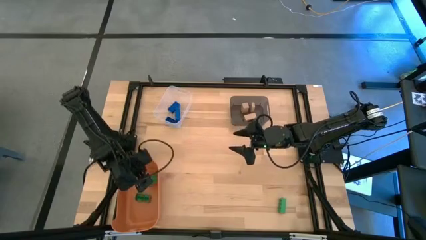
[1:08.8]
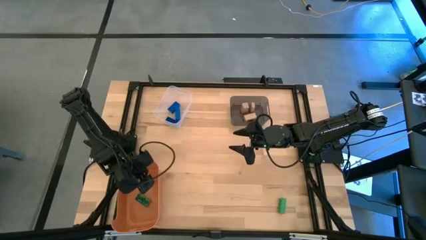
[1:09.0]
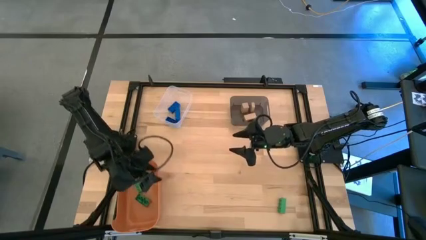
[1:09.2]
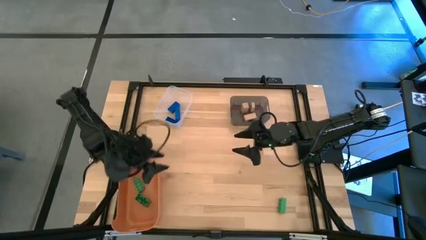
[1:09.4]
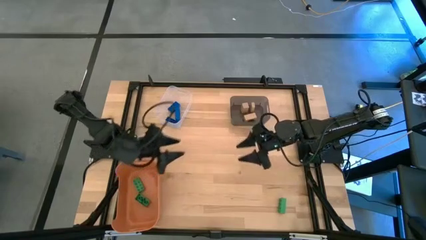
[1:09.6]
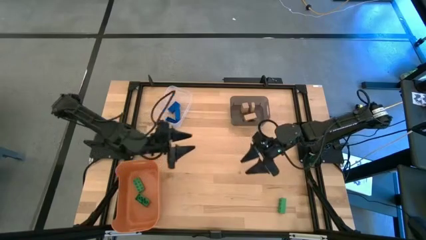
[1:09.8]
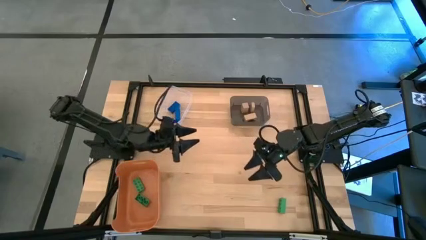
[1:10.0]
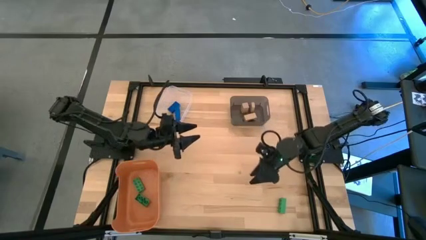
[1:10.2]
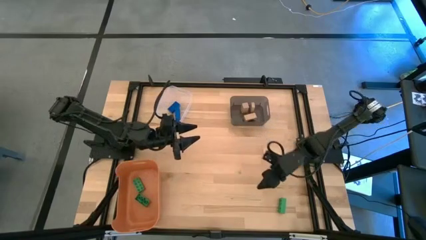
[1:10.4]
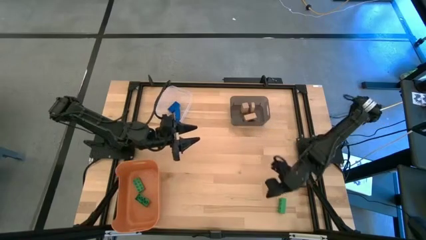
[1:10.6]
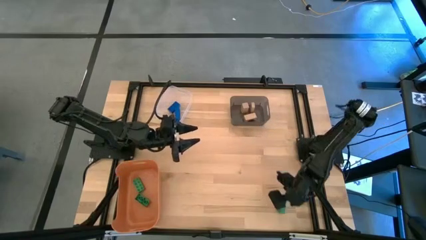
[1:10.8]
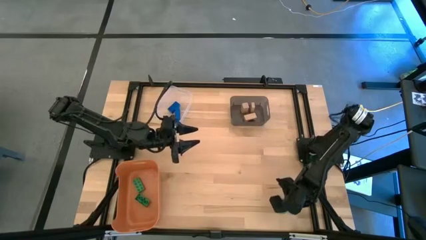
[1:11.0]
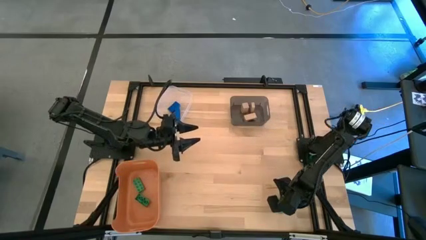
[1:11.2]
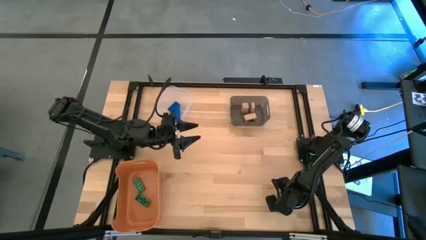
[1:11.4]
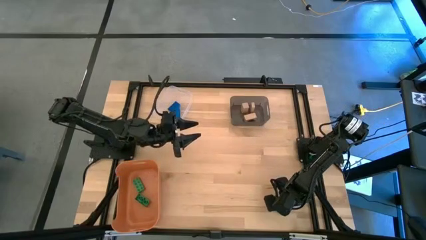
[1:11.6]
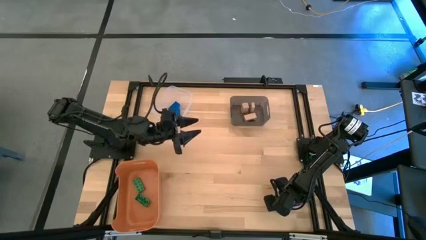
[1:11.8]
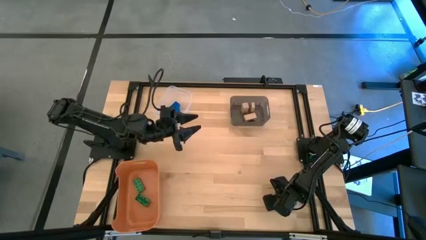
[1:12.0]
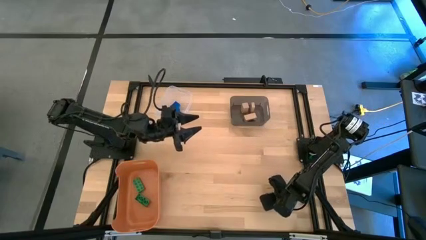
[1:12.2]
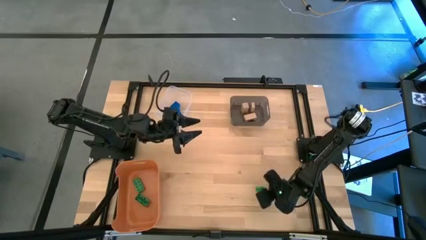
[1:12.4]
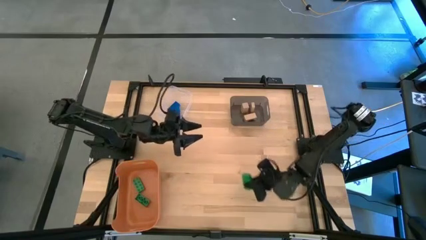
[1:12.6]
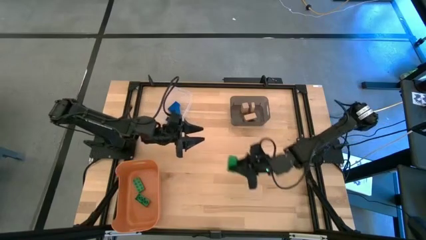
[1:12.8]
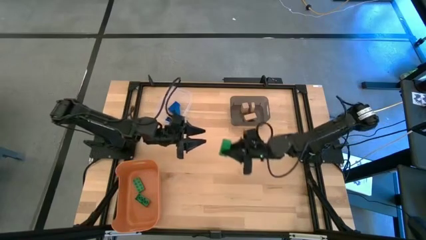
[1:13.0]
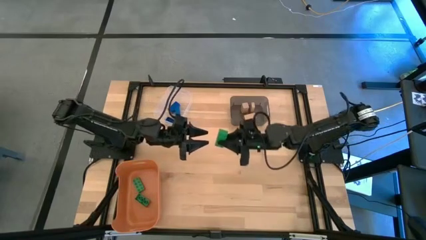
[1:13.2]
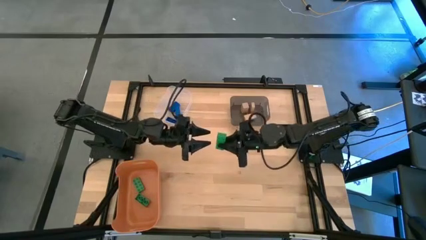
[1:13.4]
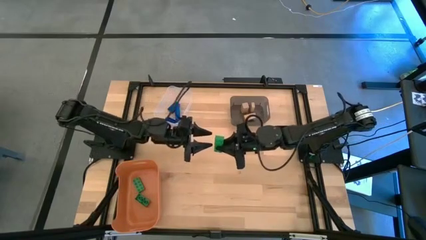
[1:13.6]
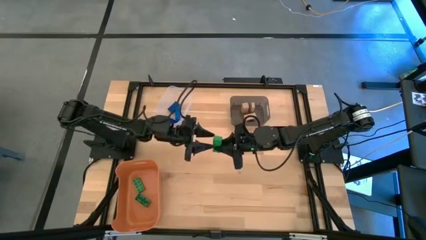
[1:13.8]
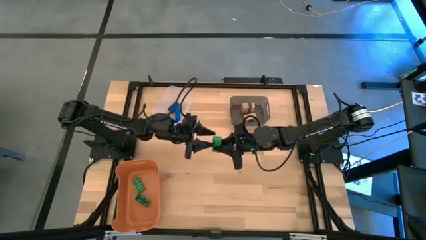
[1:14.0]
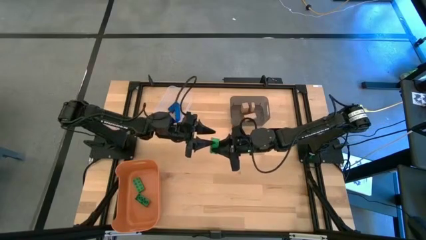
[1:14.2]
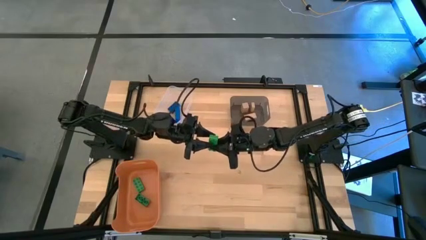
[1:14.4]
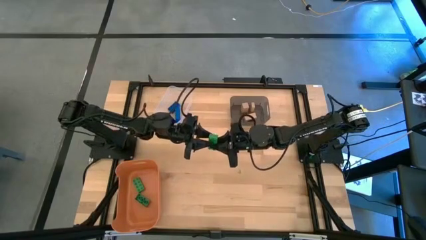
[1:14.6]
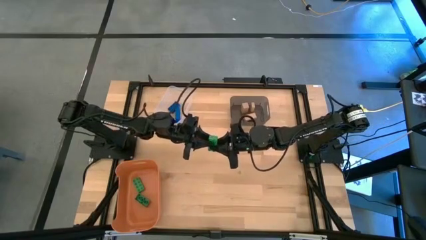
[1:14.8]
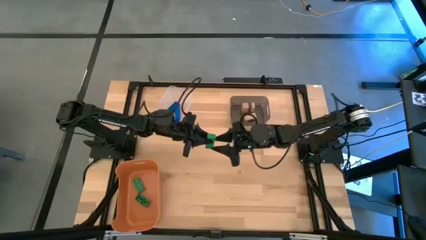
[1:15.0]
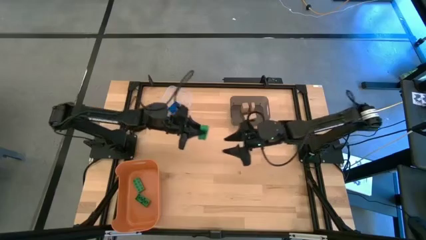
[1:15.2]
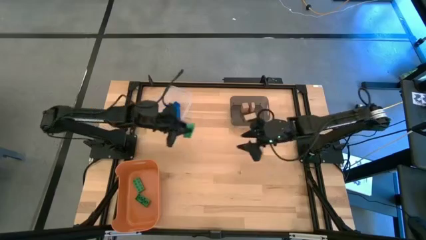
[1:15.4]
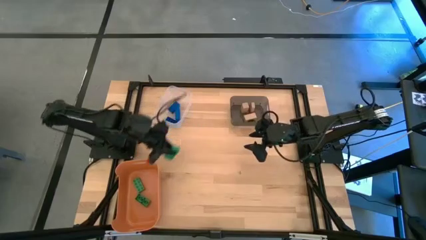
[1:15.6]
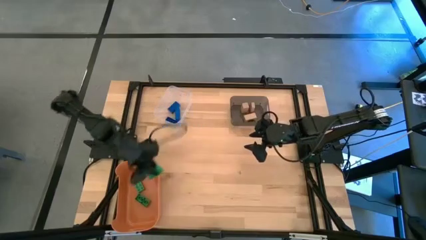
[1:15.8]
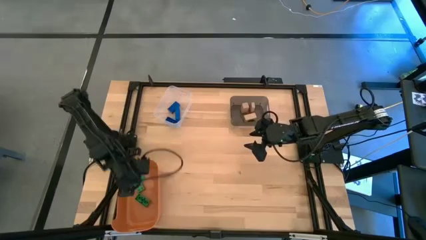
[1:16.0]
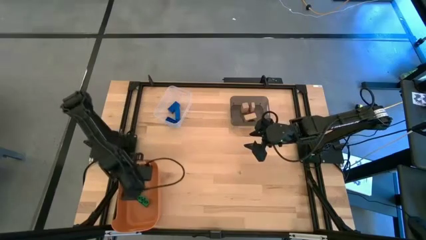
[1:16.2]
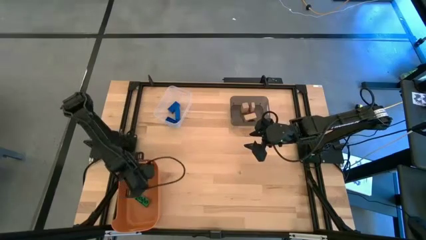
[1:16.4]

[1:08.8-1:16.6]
Task: Sort & place blocks by color
Put the green game piece into the orange bin

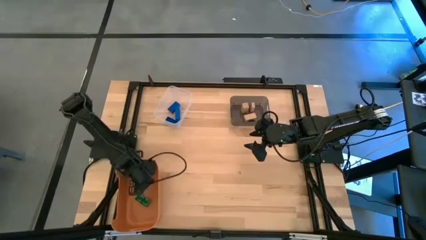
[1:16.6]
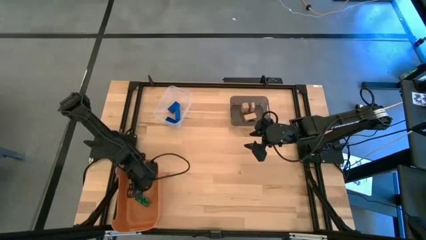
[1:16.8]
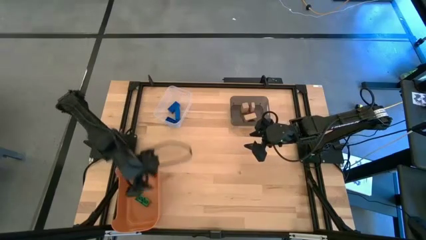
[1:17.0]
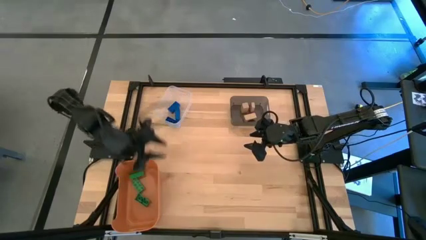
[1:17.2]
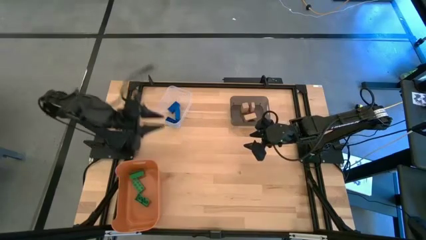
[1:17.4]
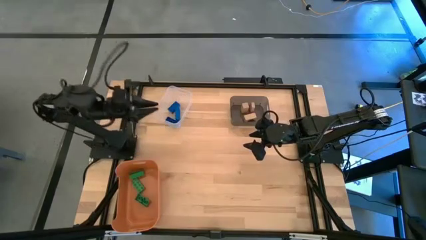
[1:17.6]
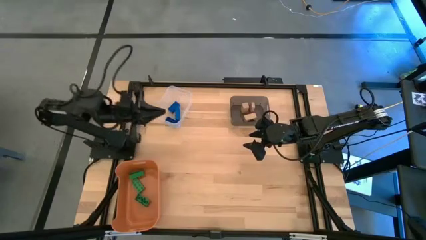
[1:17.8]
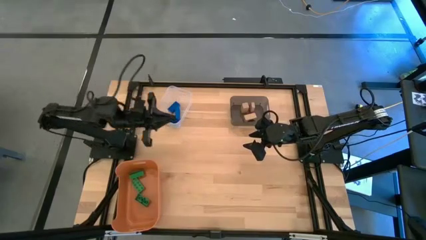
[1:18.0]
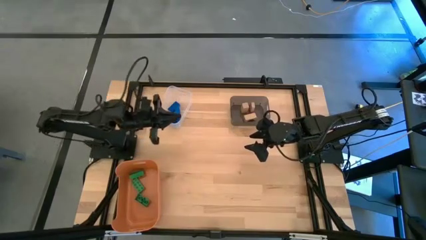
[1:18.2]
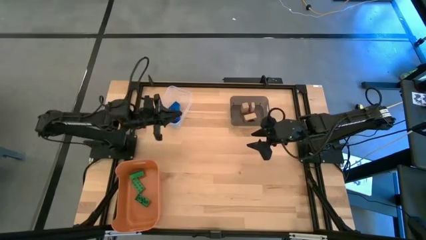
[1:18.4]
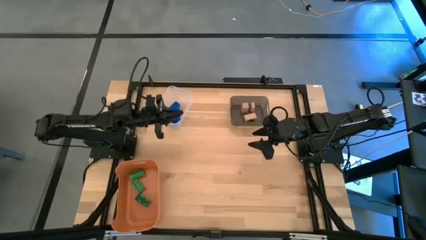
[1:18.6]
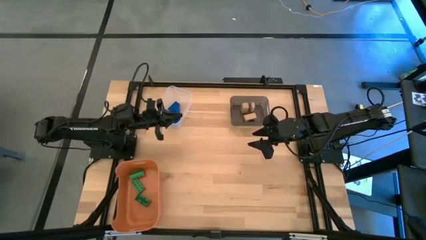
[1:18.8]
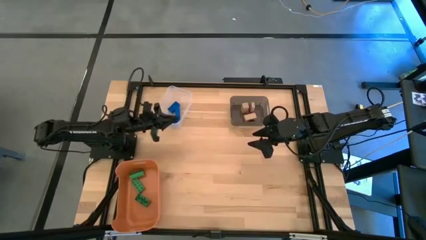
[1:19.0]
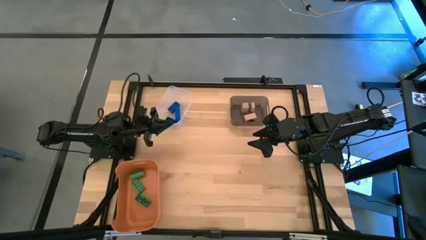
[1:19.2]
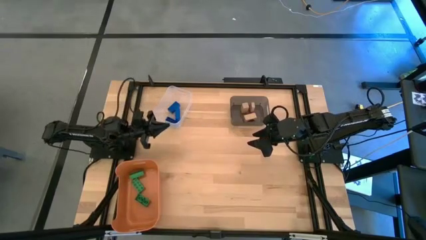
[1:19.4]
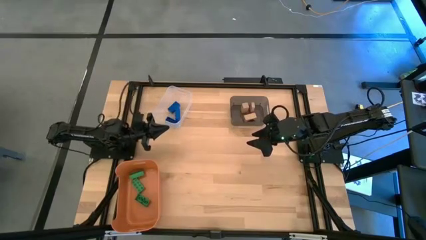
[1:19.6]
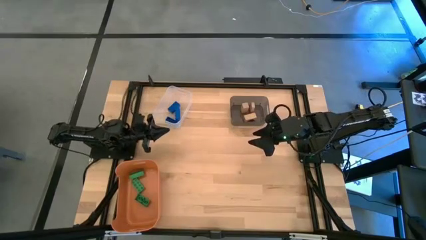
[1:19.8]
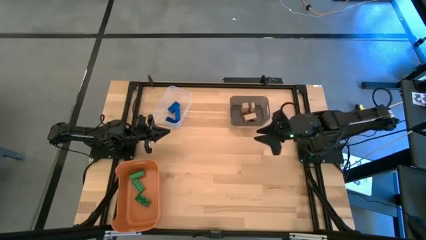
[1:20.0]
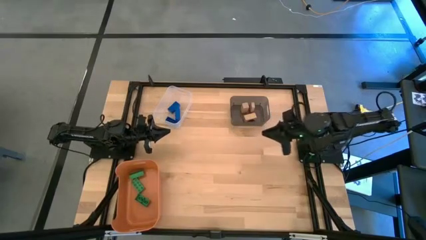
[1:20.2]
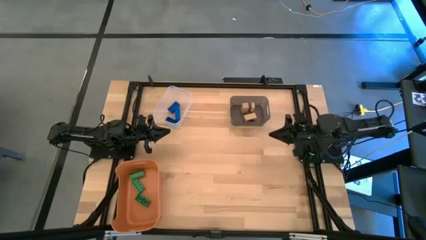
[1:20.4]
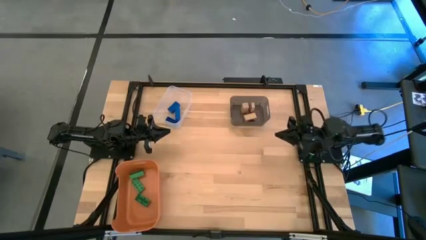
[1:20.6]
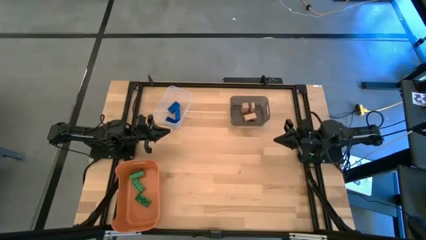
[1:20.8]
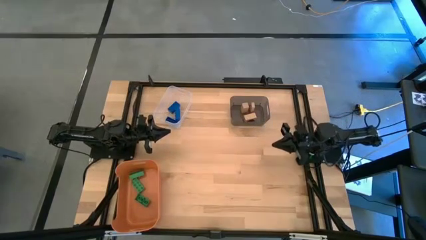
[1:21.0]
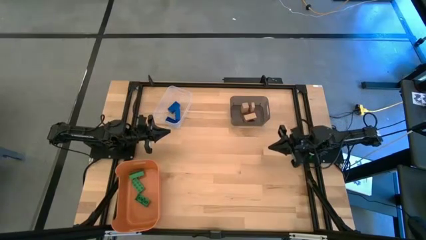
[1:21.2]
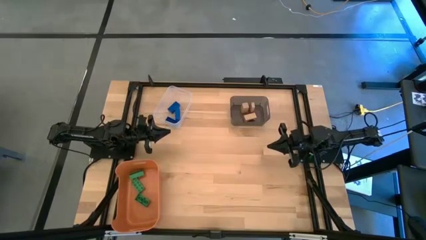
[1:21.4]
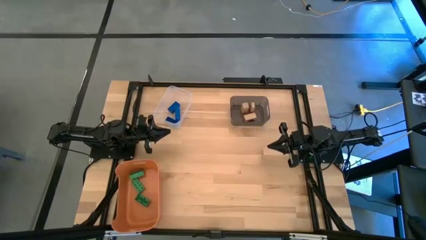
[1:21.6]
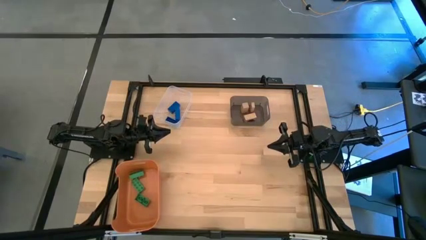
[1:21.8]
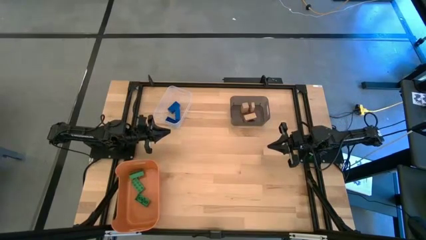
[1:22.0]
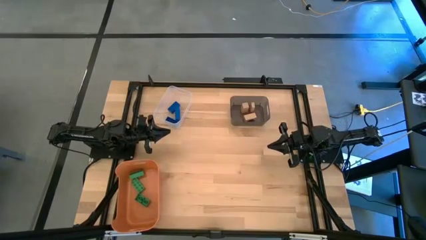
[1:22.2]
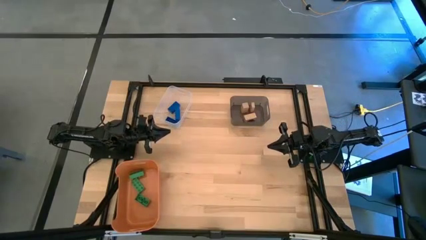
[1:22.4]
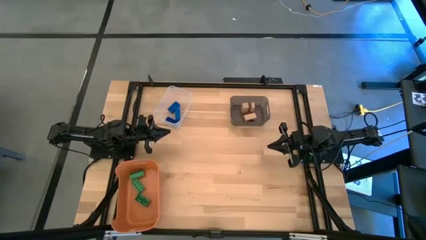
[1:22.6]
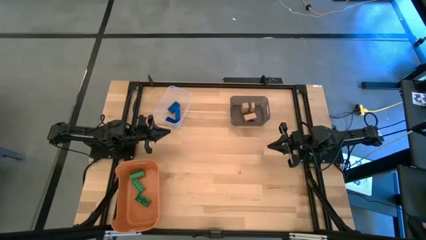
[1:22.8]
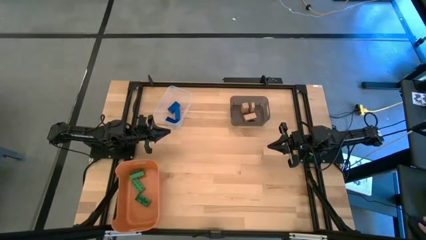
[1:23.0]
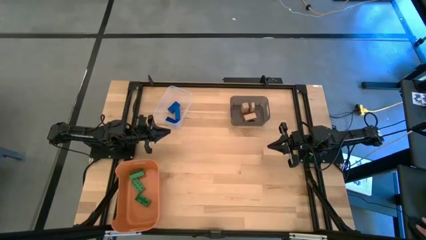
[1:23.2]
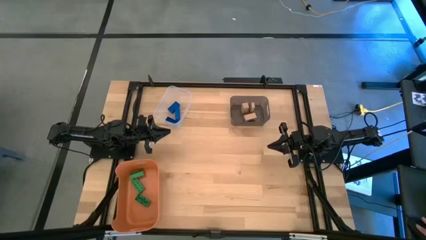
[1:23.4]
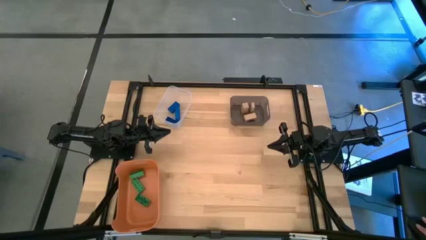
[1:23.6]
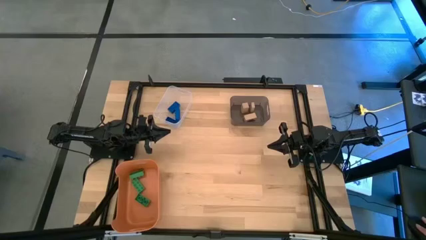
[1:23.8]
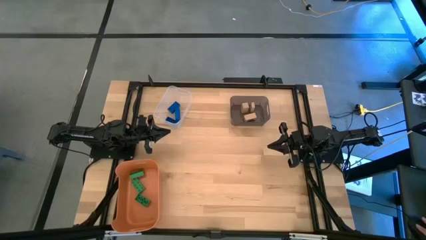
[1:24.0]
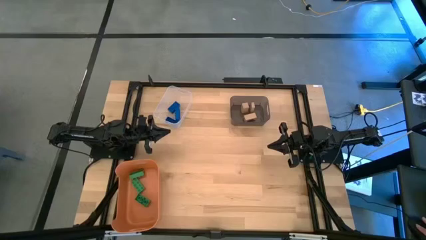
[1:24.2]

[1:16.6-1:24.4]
Return to Home Position

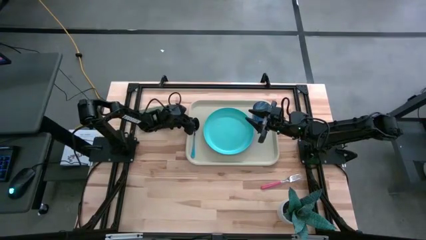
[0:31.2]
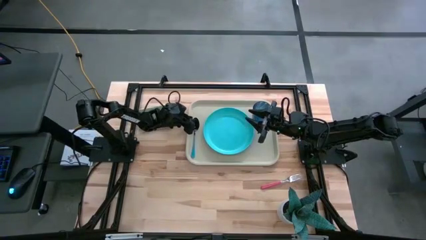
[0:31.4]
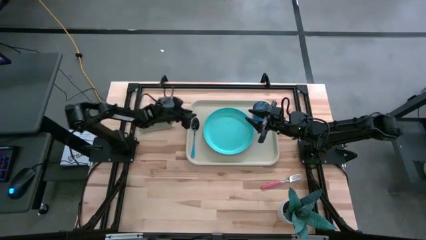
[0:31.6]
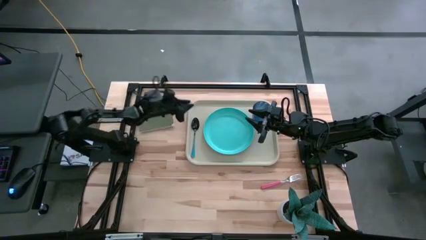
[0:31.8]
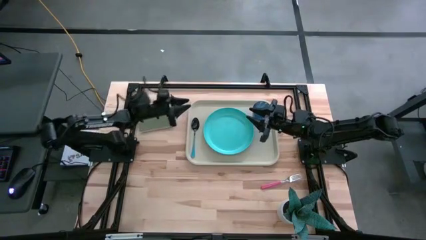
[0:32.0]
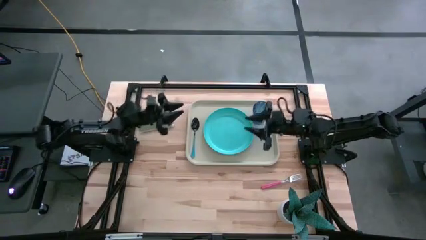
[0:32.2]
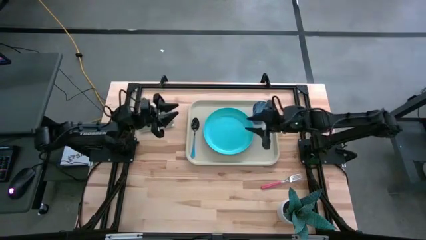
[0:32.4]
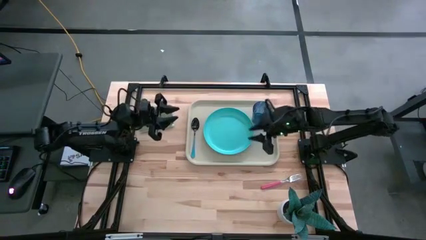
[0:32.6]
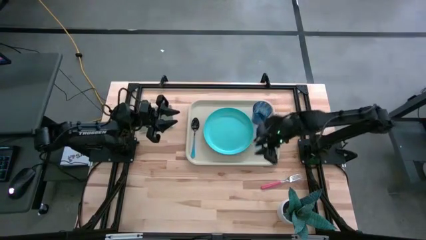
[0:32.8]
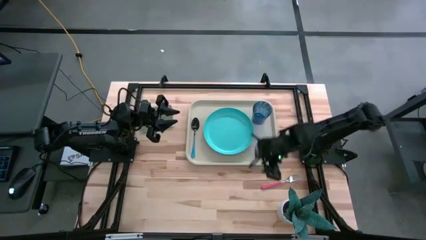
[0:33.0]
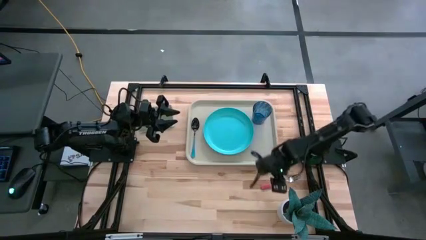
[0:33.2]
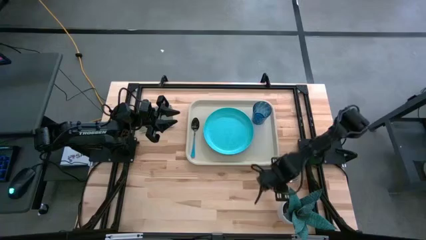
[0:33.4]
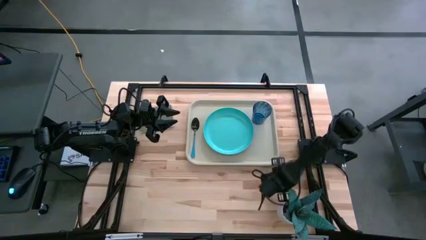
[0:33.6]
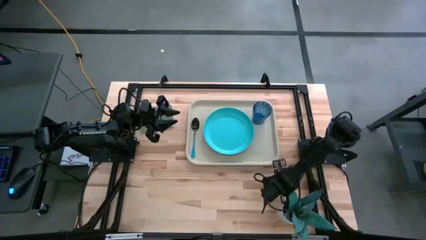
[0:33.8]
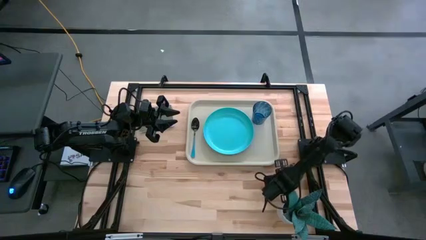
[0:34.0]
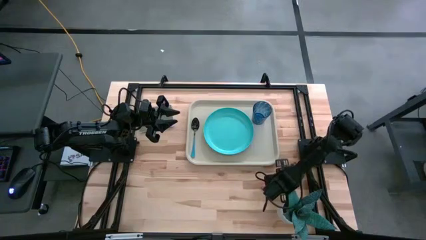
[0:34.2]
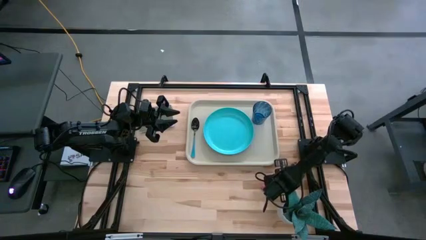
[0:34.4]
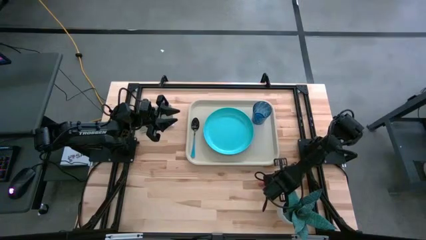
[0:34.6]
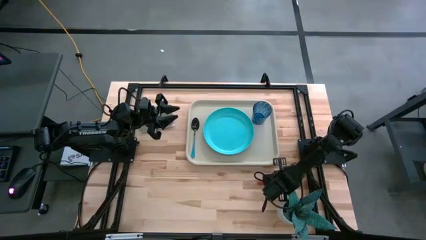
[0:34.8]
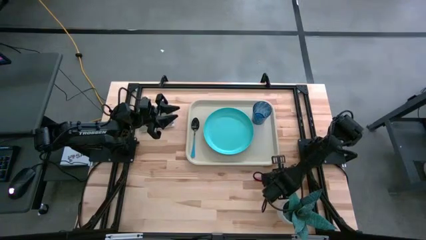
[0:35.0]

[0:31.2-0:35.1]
Task: Pick and place plate/cup/fork/spoon on tray
Put the pink fork on the gray tray beside the blue plate
